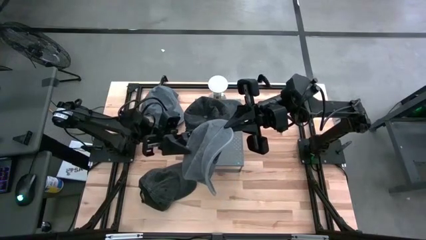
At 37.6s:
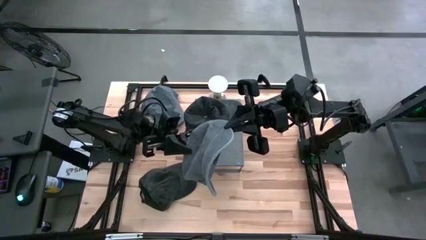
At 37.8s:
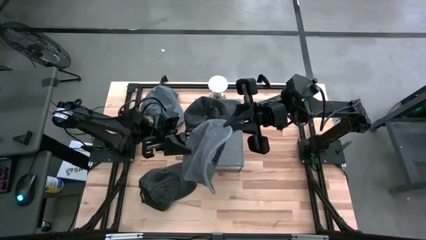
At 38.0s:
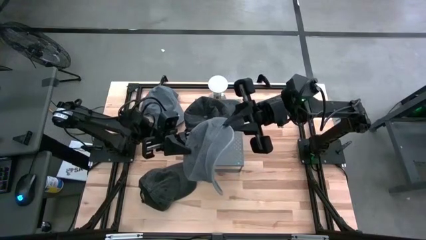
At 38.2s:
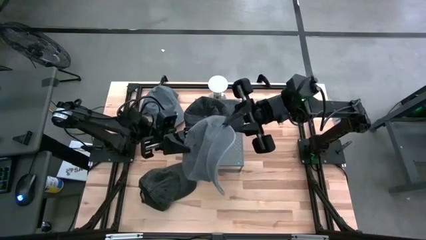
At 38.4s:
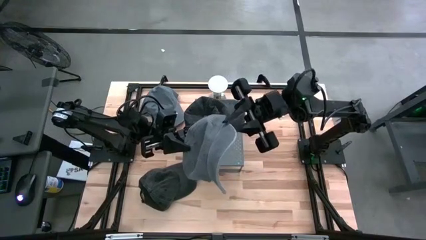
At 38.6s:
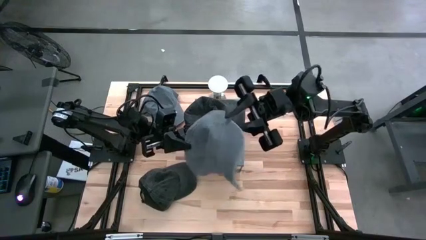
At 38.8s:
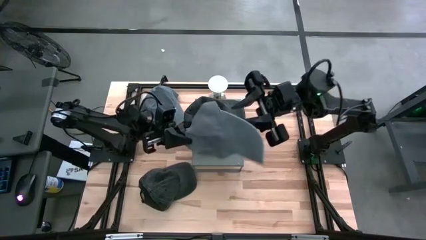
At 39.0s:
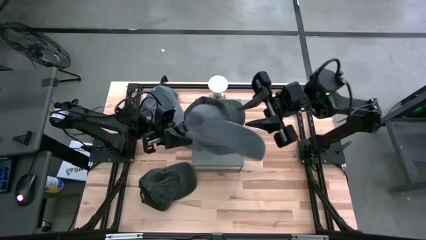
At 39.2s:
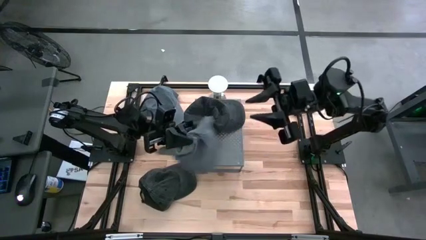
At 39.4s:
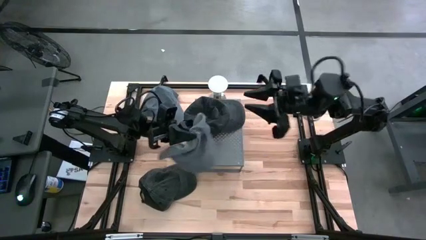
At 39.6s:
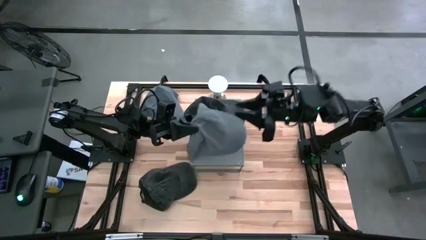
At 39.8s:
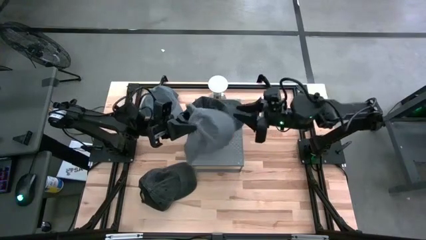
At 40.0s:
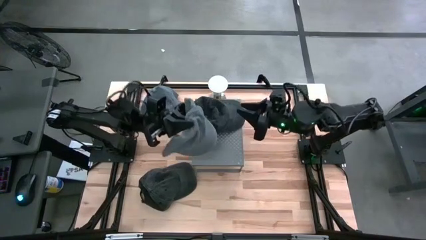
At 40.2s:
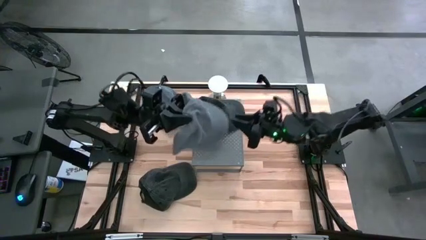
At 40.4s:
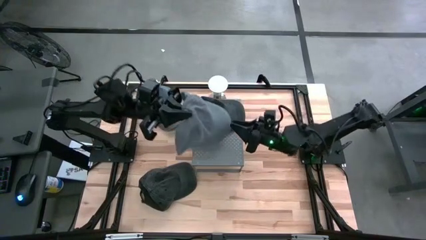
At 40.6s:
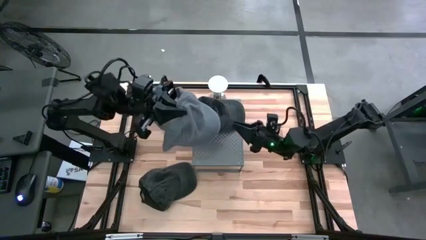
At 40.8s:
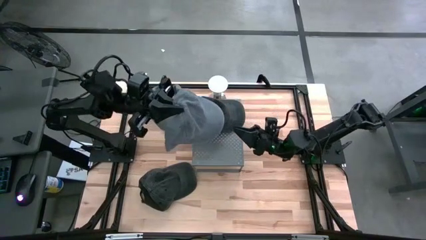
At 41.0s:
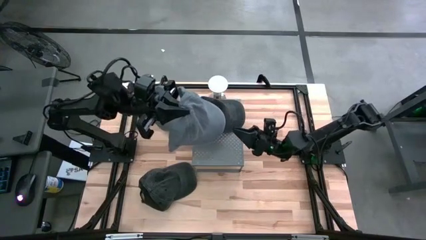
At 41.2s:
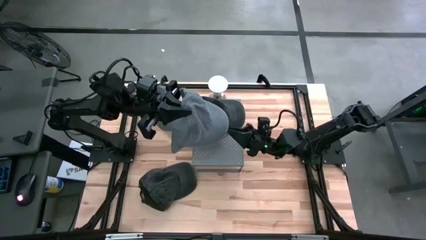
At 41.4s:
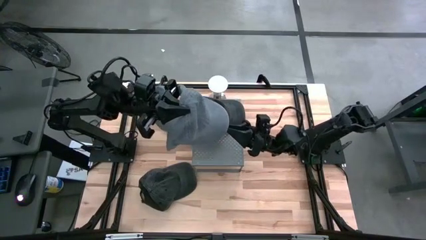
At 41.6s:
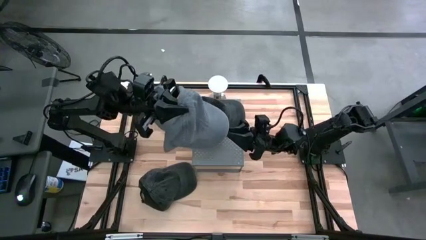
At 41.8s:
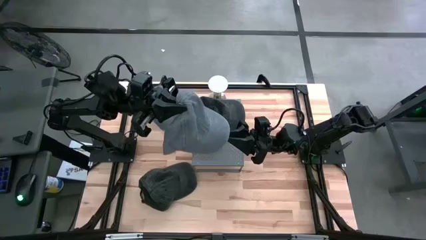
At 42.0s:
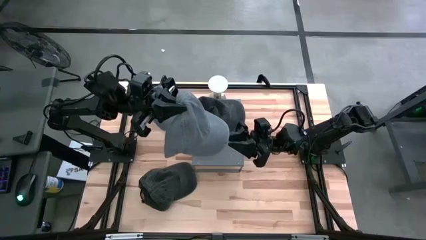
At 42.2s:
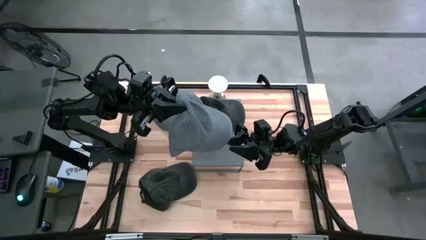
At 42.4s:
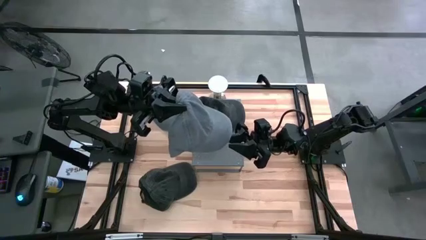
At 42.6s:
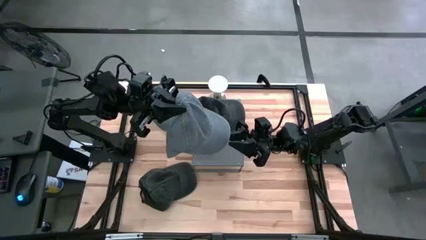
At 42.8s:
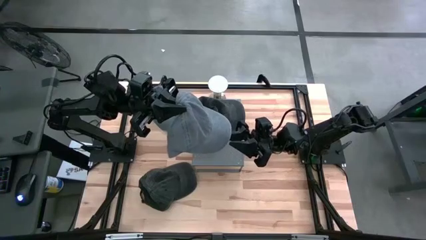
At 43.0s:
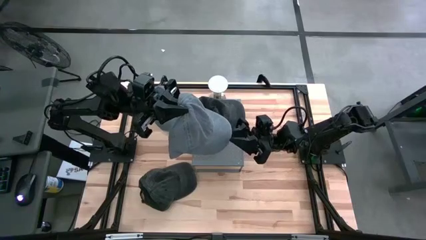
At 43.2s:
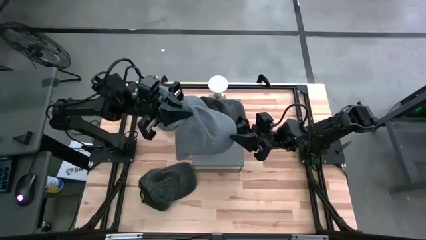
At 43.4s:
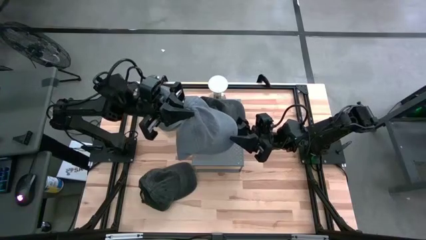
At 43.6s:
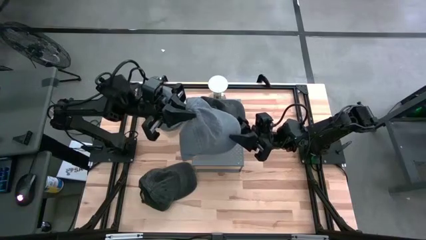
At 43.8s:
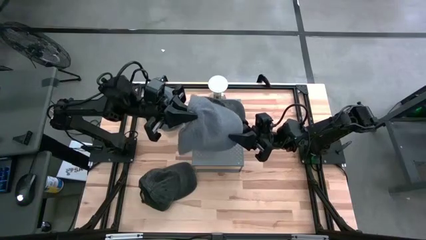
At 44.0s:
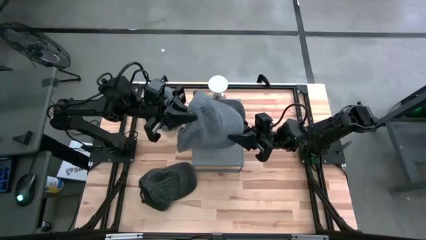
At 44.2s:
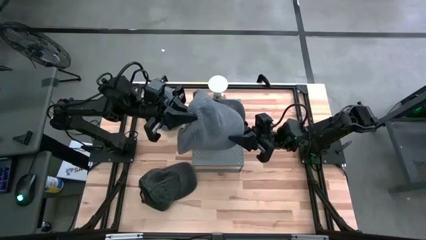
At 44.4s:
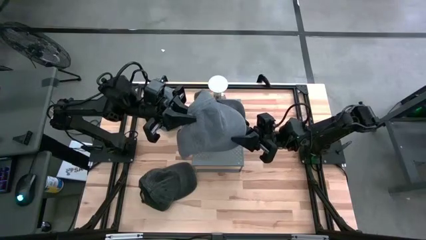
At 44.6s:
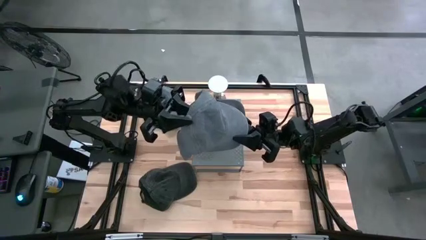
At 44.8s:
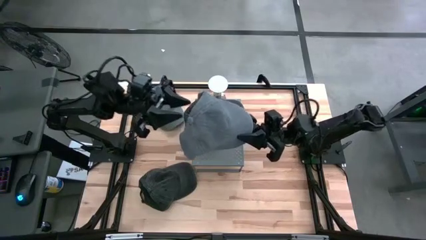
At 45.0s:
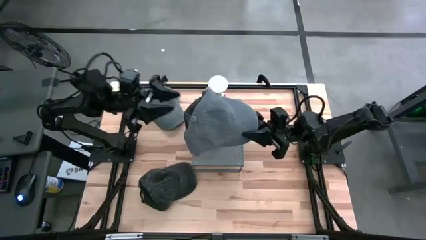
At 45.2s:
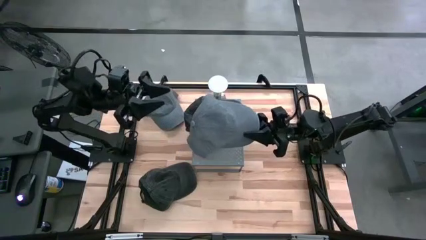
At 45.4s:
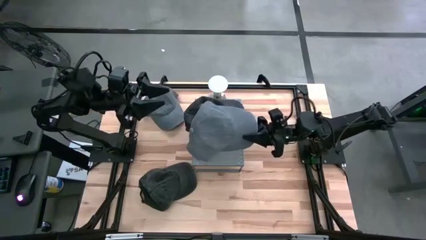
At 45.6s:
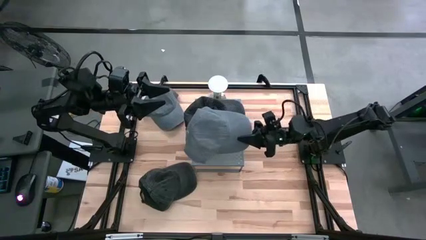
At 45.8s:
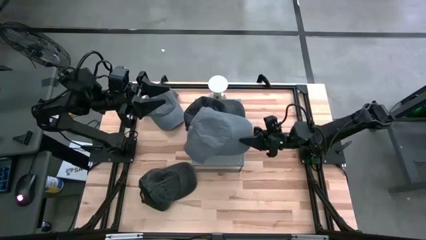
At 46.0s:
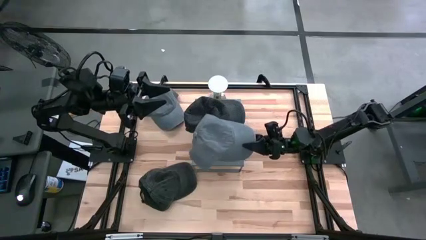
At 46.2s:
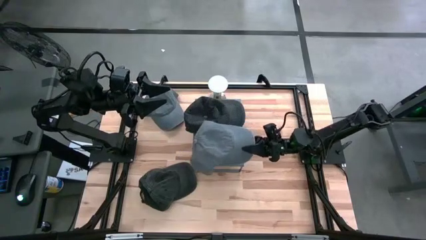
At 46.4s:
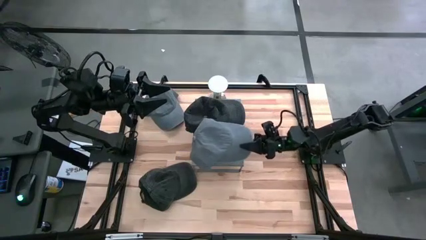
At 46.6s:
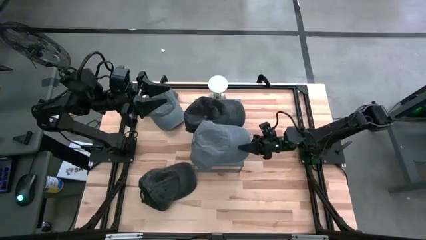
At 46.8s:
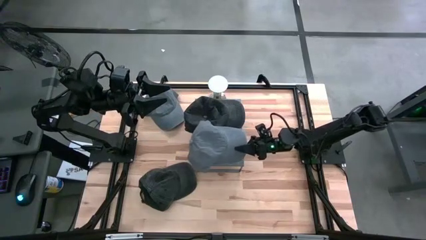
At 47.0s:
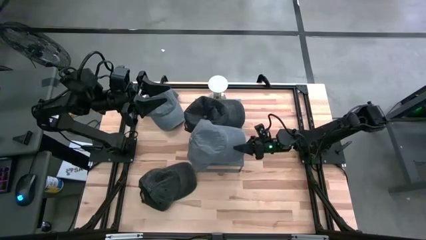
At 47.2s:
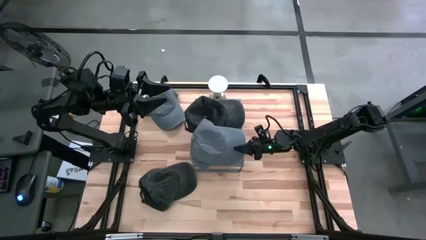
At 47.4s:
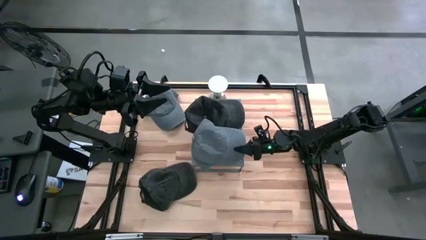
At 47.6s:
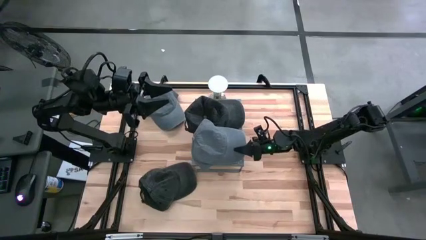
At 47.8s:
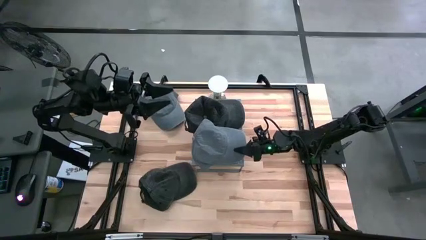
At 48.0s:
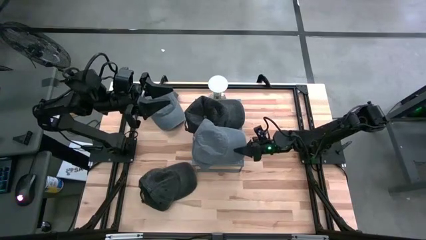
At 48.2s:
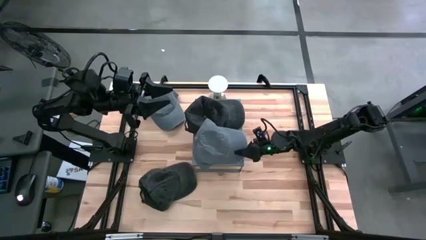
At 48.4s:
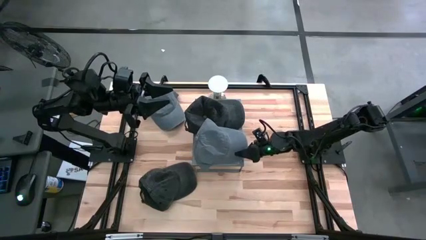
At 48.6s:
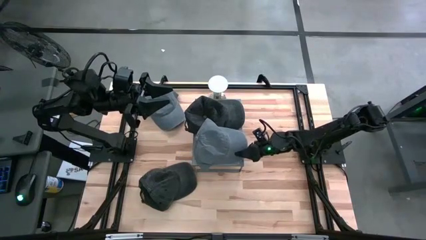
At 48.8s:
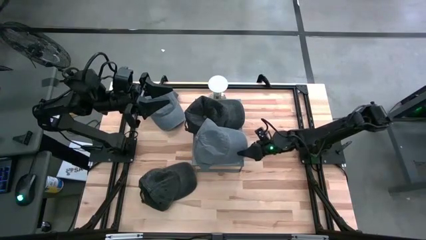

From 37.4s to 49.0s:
Task: Pick & Place hat
Put the bottom gray cap on the shelf

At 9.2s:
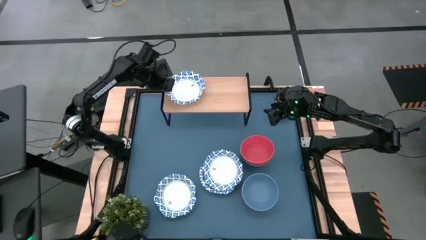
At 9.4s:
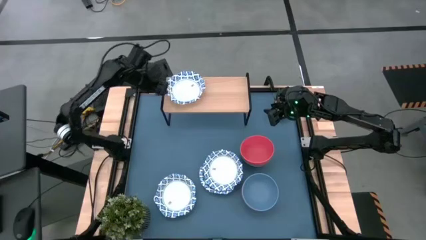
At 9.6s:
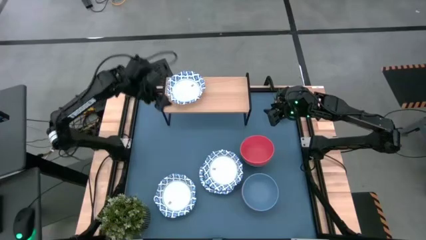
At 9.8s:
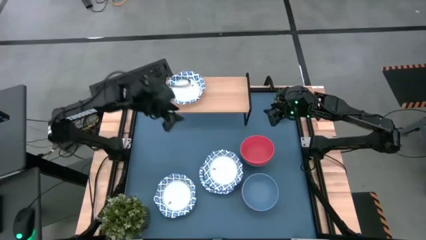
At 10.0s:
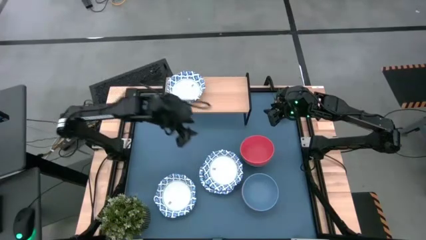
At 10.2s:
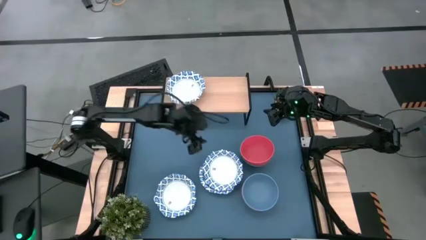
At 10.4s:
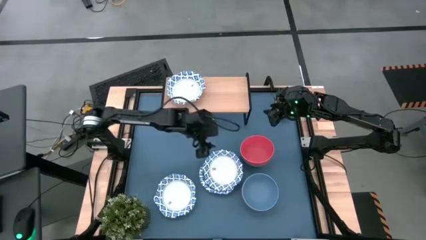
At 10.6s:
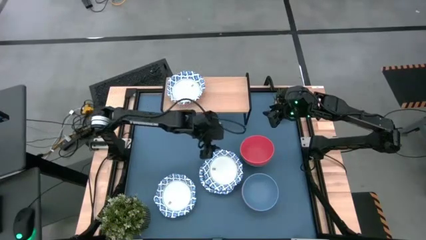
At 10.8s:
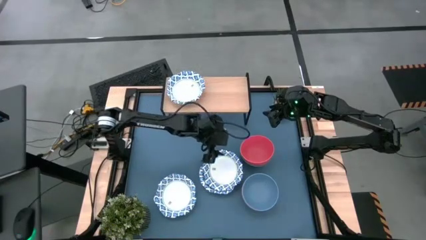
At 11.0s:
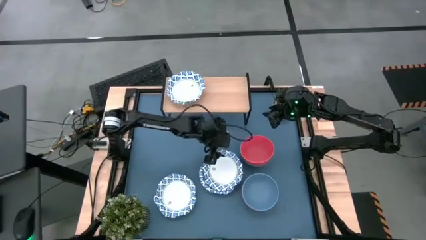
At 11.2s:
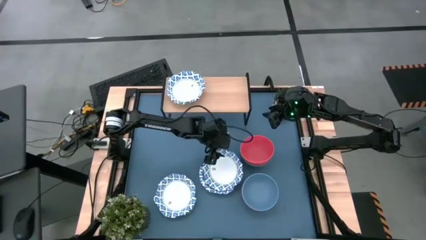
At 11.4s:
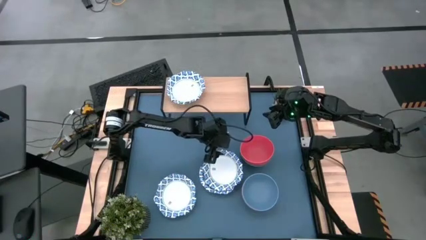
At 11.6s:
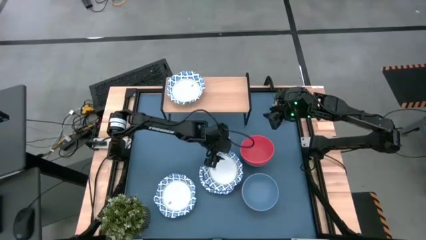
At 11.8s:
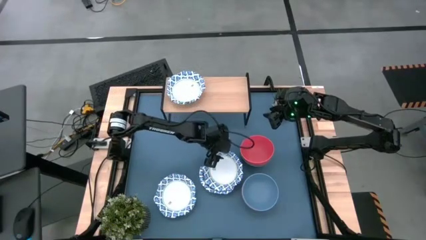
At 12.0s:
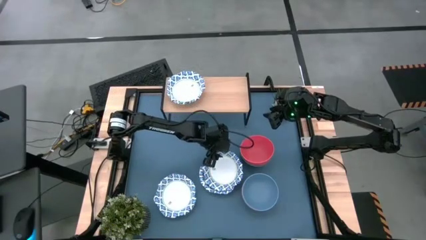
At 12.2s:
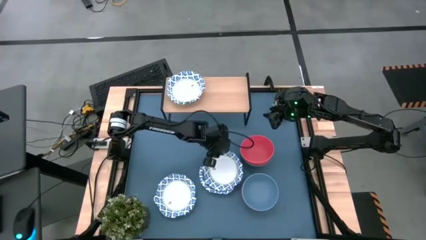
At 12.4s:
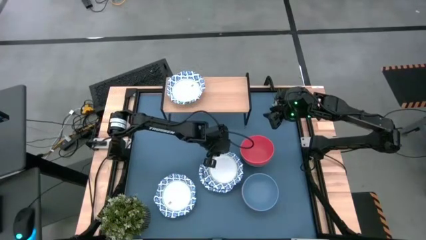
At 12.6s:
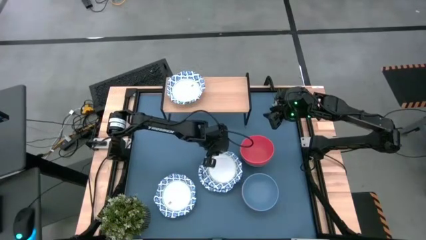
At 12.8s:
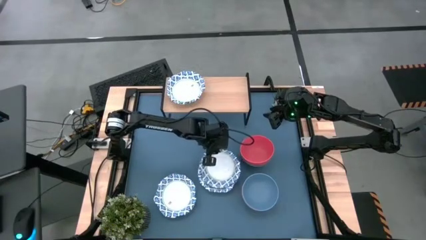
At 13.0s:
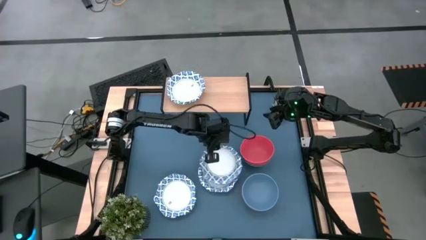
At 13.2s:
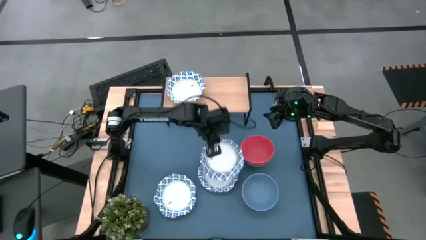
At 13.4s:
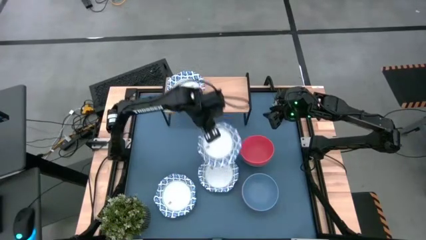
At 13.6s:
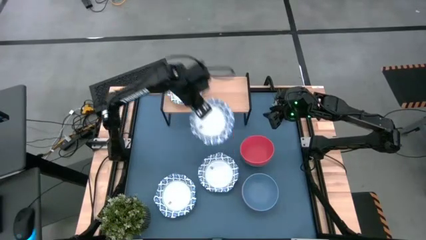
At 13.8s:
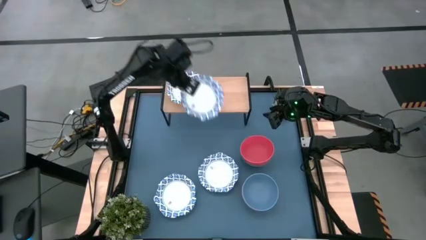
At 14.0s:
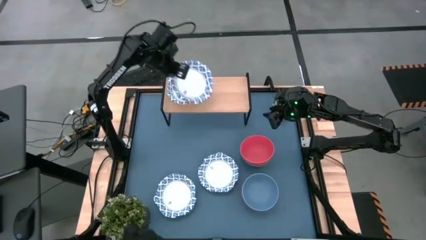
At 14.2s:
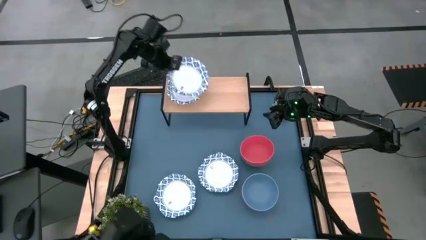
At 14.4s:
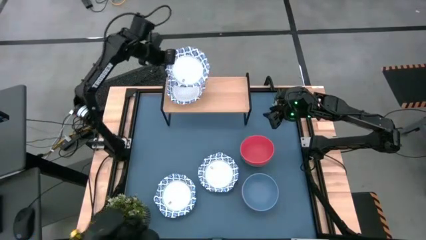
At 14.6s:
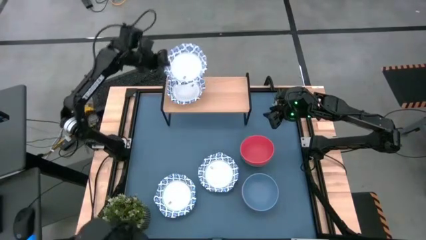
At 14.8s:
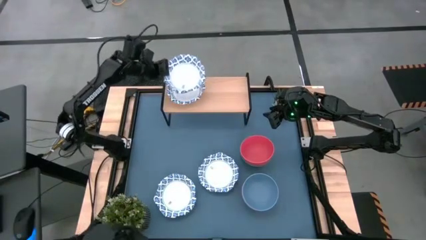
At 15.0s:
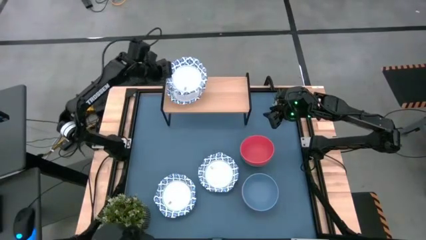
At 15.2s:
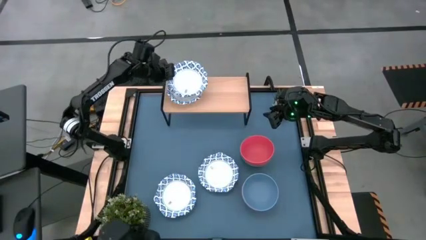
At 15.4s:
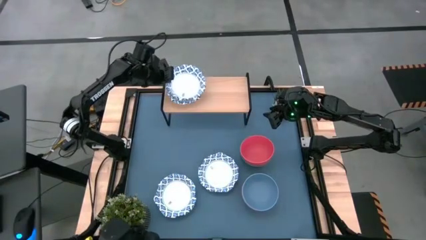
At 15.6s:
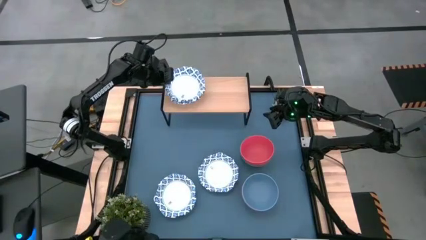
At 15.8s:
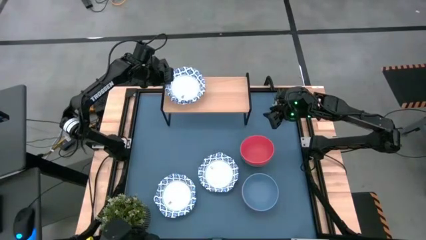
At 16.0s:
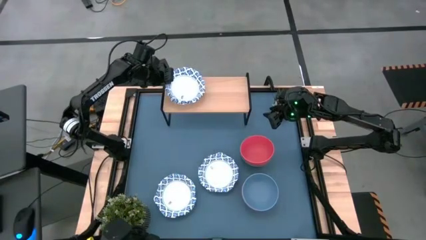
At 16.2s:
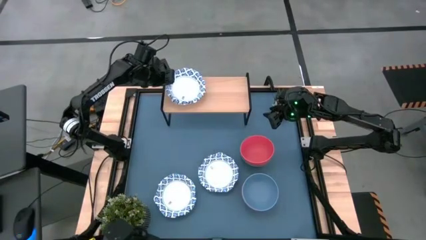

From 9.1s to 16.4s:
Task: Place and stack bowls onto a shelf
Stack the white bowl on the white bowl on the shelf
